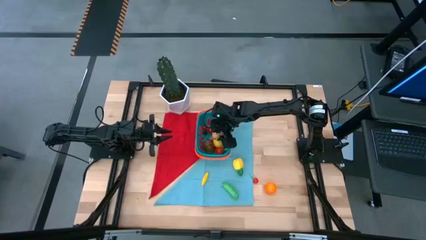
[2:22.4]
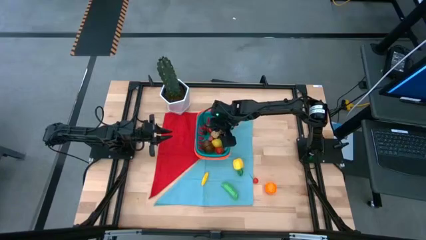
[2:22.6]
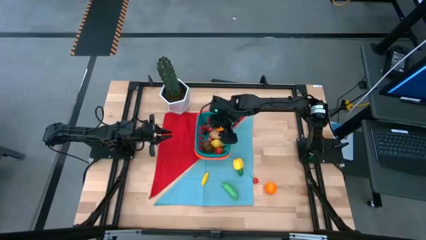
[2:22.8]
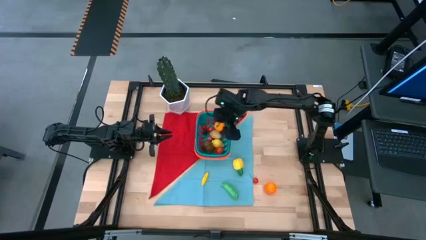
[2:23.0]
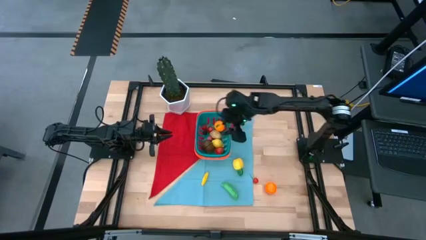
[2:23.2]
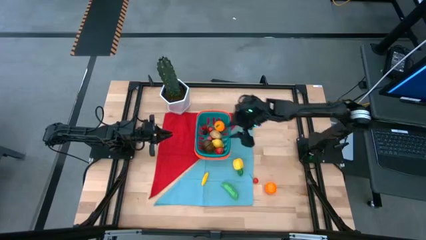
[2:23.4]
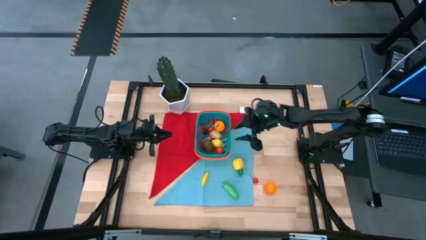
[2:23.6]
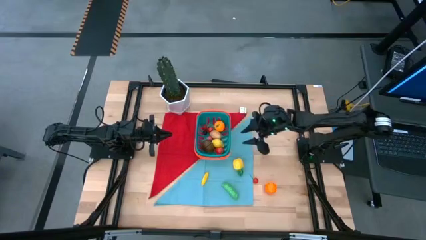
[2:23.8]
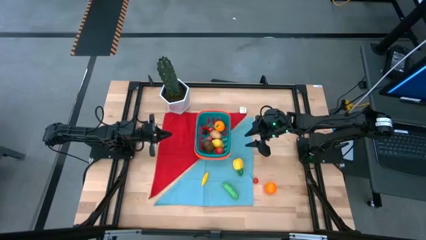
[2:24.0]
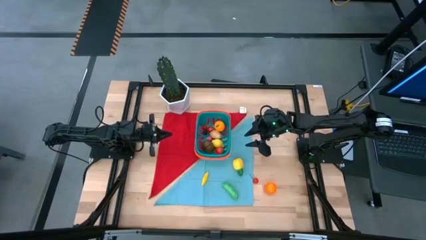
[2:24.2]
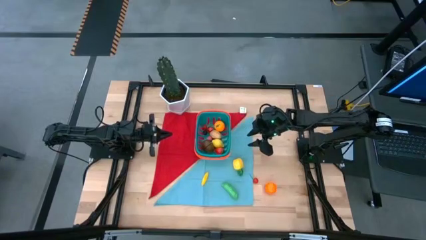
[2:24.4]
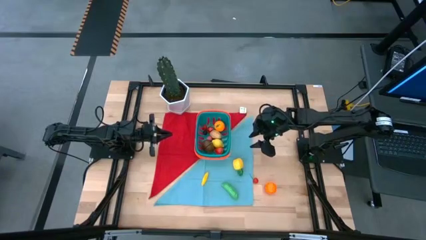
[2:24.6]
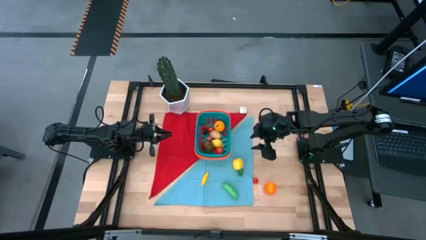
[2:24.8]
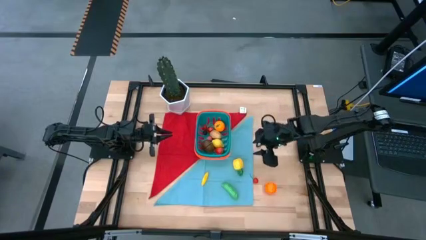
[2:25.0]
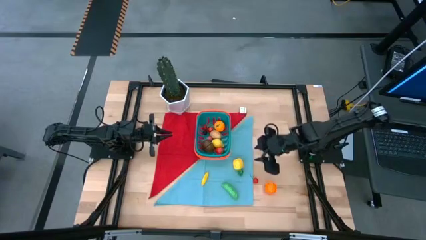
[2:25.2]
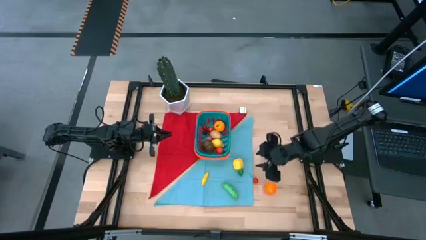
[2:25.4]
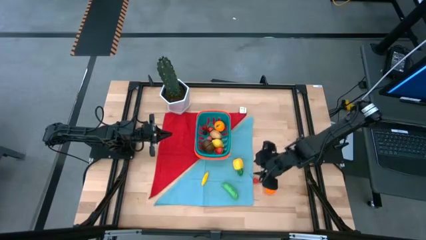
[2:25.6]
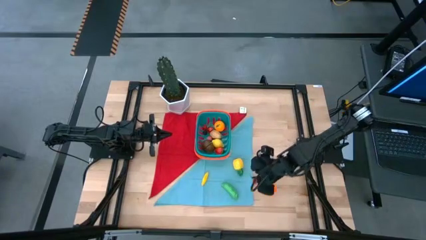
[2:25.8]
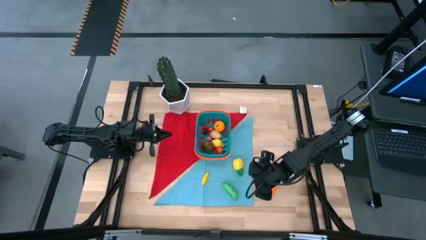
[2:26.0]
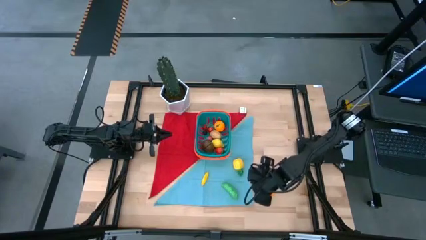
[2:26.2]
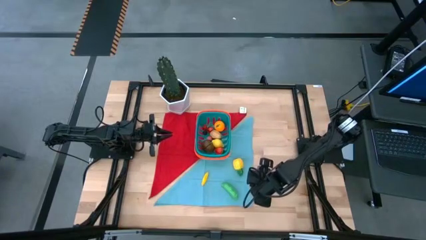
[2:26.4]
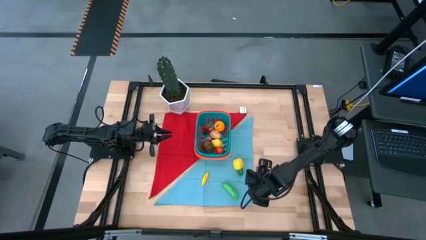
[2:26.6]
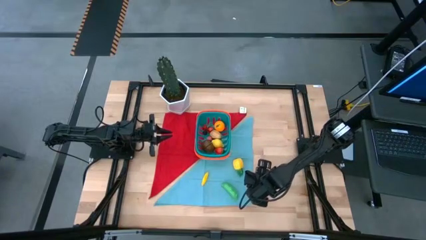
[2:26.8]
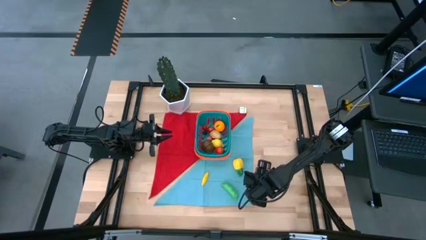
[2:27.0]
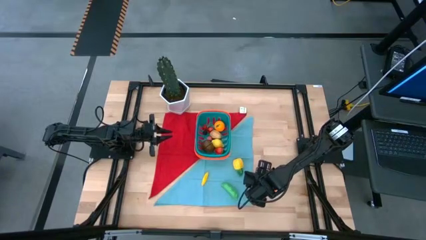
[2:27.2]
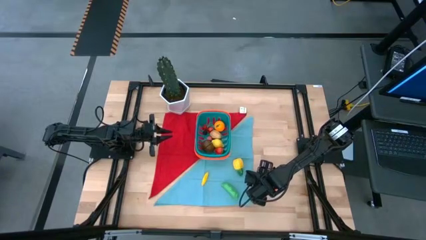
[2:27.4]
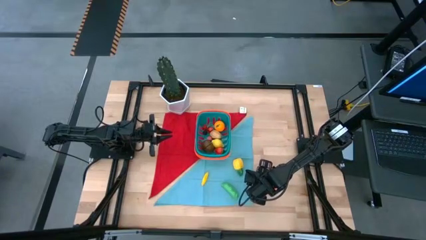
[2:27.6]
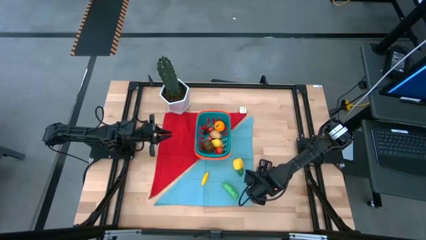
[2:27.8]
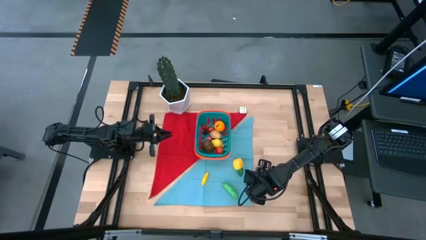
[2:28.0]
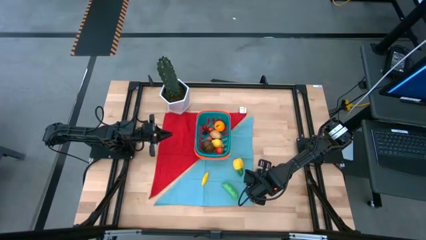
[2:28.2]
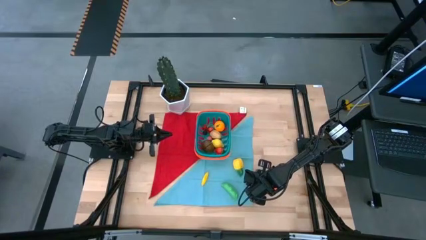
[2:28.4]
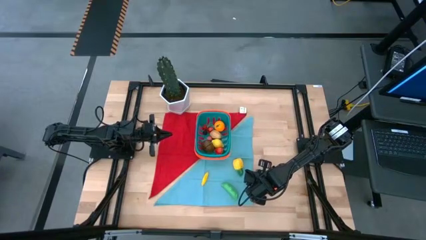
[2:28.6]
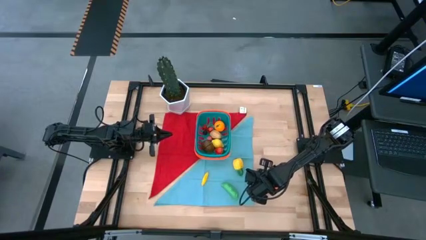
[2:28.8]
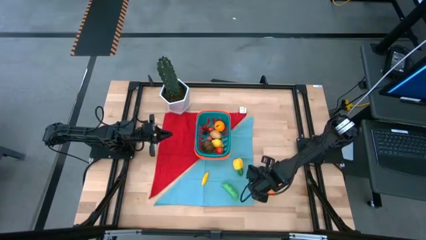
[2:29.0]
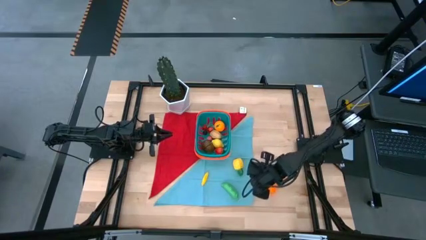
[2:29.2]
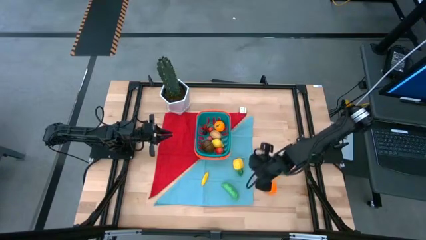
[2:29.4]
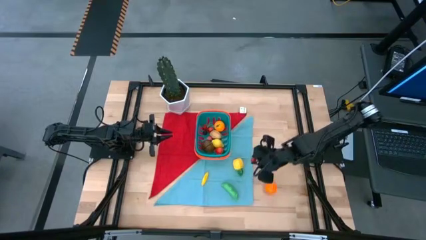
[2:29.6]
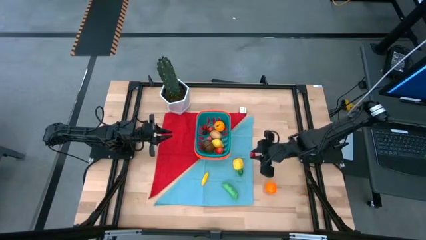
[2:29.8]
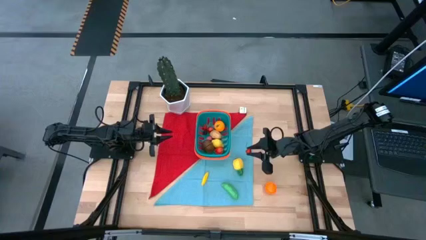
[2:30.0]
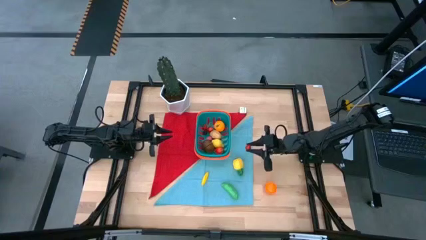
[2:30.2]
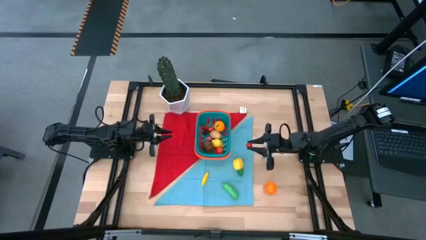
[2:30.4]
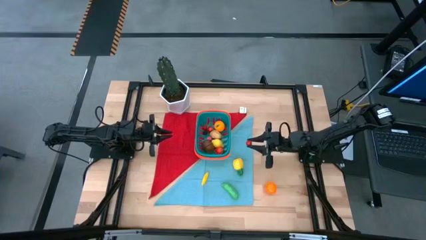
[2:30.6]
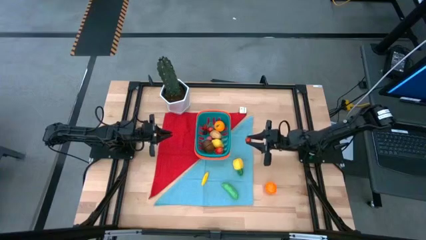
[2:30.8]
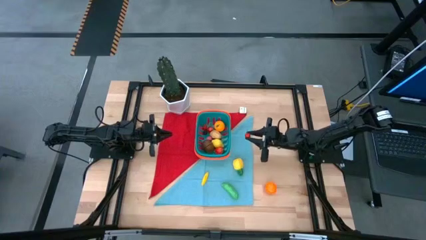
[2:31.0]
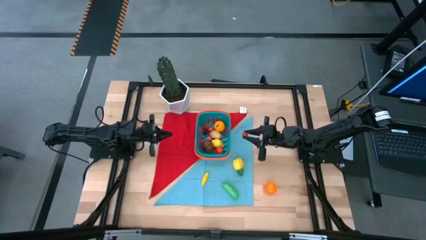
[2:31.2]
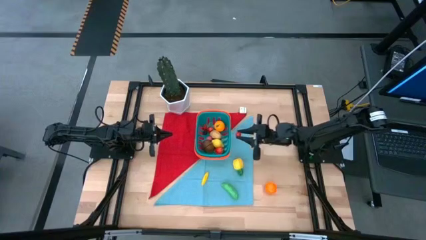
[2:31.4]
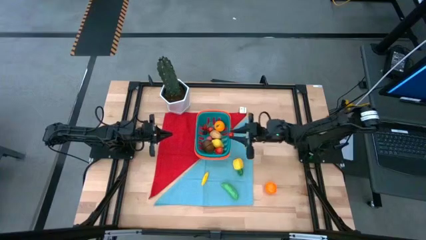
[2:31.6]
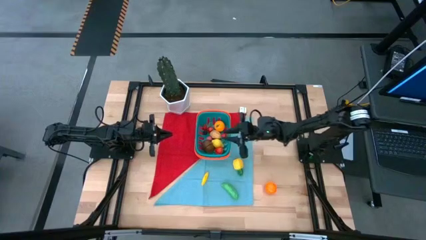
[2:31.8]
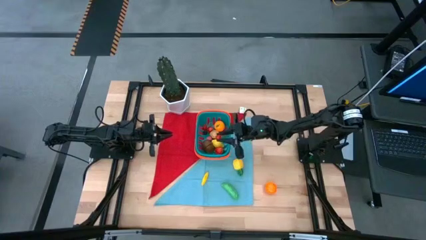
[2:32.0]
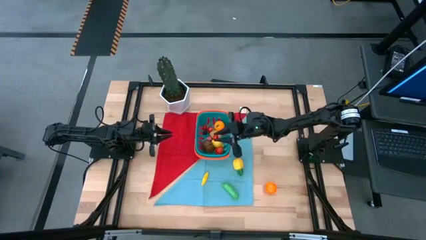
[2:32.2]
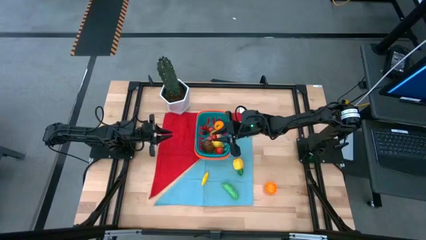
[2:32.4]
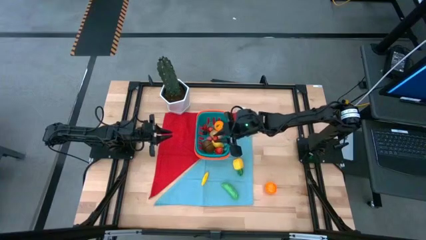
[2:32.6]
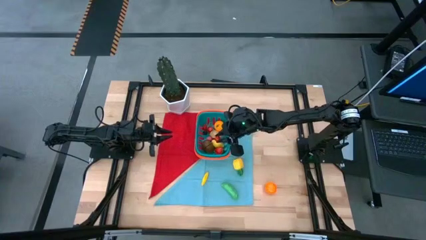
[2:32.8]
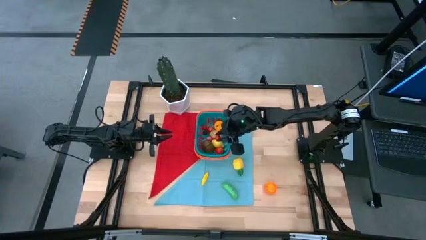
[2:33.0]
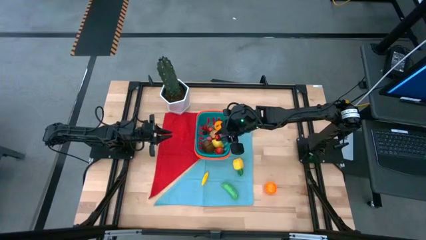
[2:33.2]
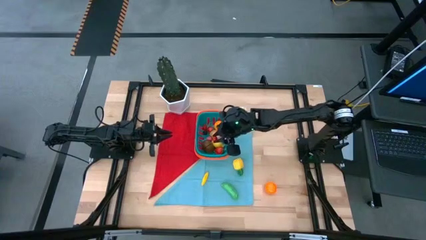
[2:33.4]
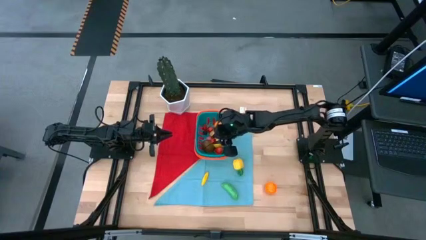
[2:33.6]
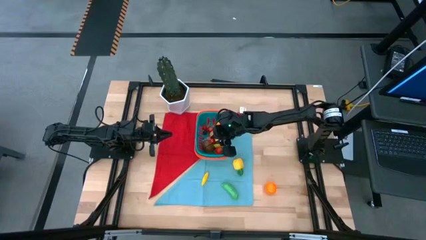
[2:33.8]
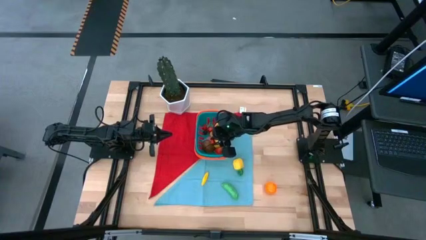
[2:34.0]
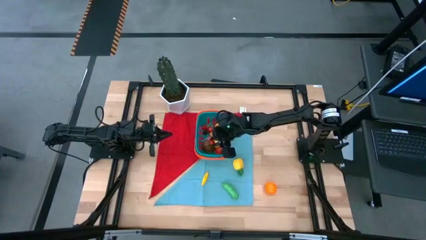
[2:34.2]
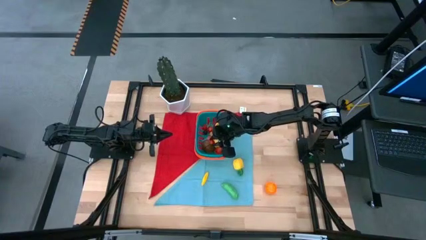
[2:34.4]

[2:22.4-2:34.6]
Task: Pick and placing Produce into tupperware
Put the cherry into the basket

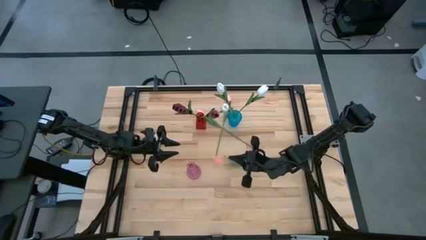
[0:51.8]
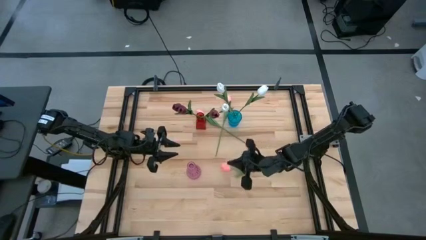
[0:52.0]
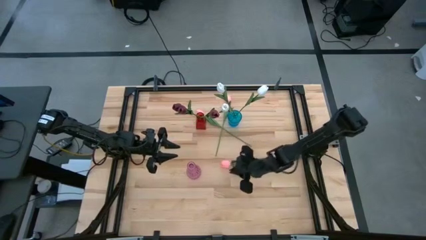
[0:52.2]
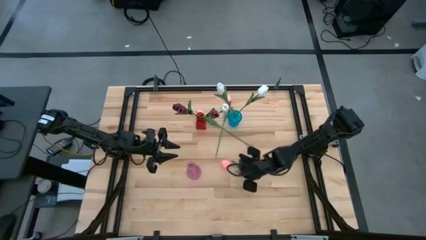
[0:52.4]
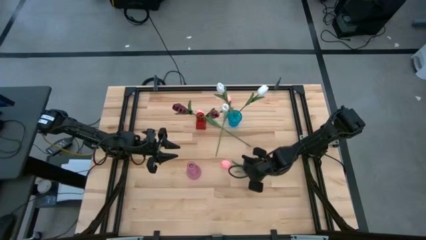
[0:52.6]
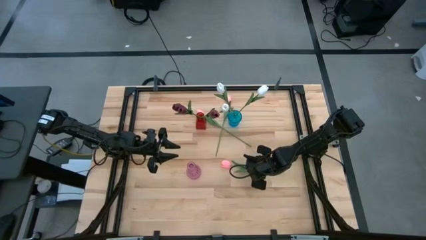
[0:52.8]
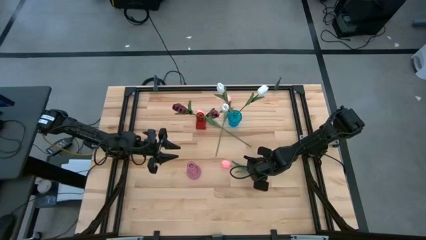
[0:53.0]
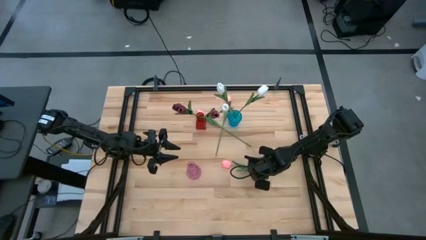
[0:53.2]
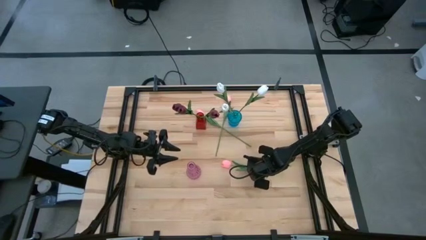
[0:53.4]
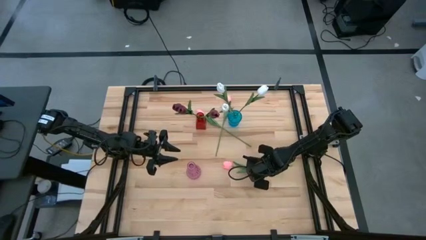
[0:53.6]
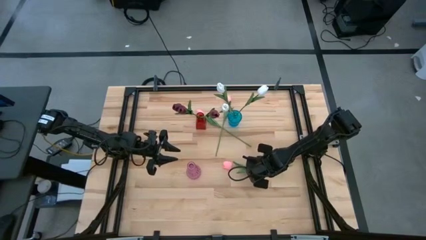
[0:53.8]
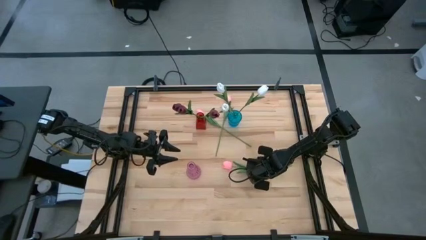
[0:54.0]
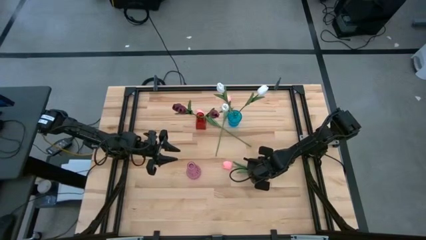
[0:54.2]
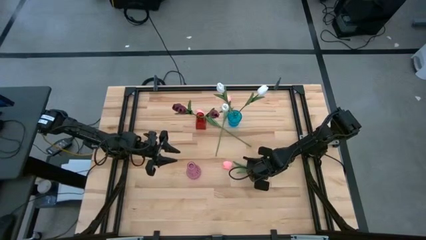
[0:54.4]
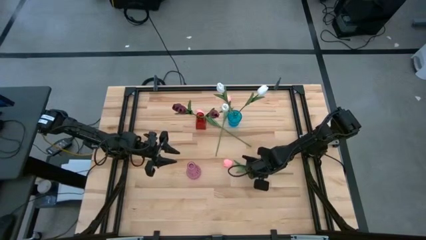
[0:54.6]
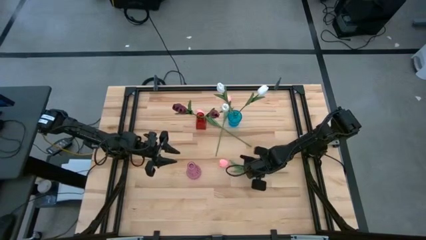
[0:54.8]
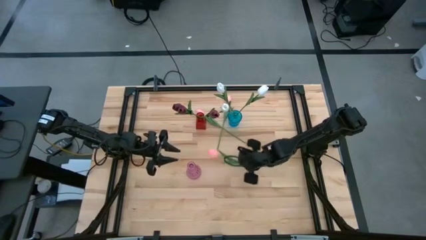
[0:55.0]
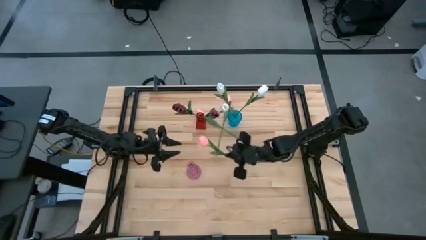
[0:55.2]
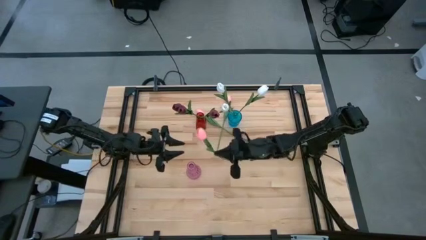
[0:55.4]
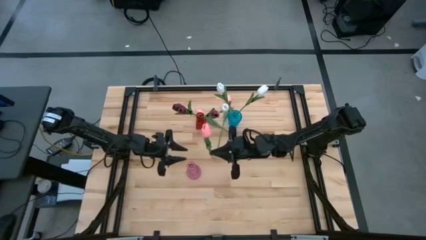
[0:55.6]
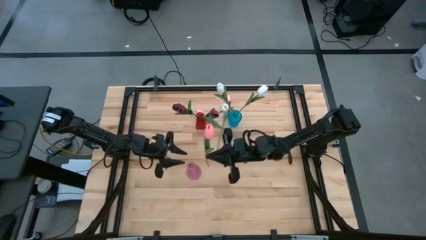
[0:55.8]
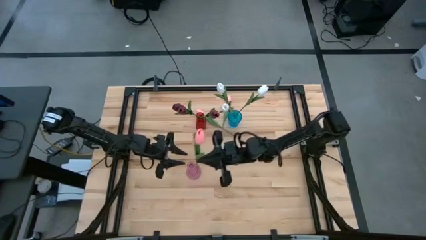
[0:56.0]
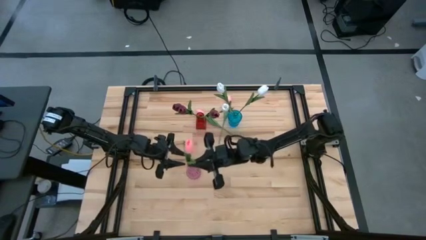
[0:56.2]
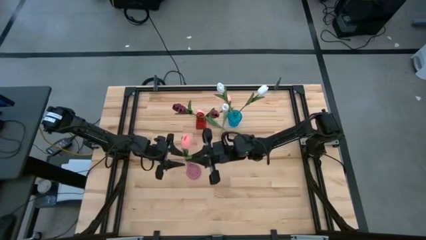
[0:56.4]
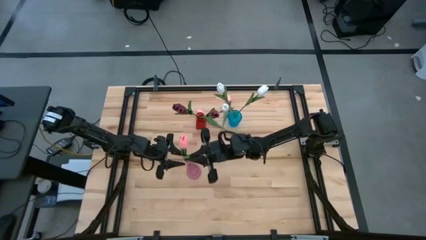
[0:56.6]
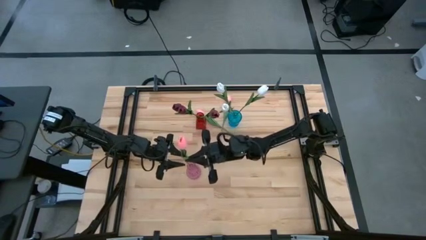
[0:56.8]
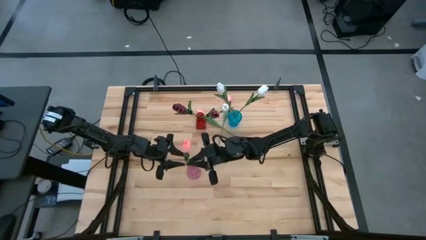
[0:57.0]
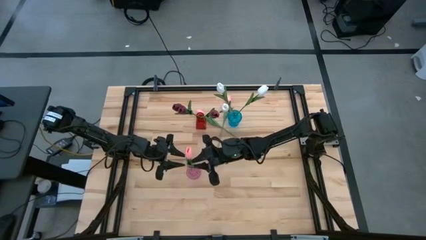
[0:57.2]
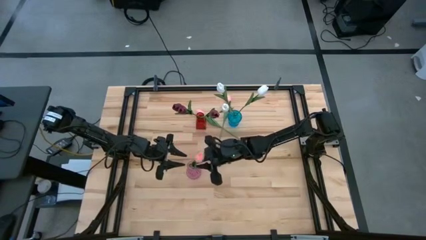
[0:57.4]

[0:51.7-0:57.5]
Task: Sort flowers into vase by color
Put the left pink flower into the pink vase
